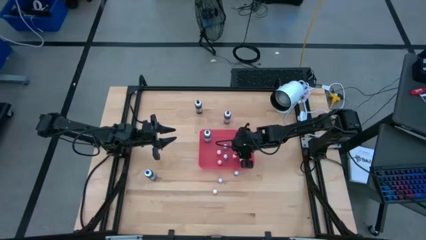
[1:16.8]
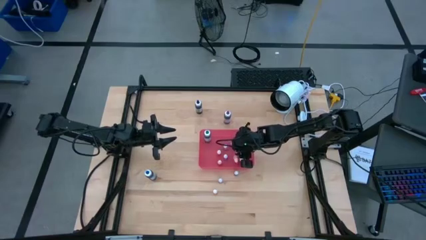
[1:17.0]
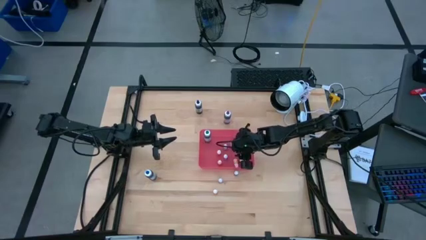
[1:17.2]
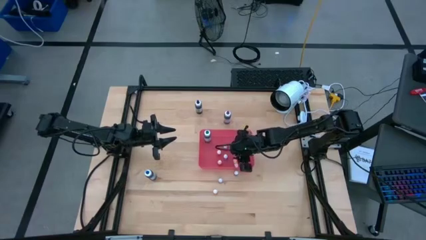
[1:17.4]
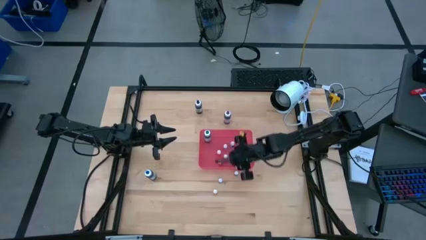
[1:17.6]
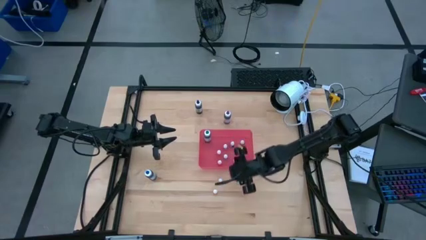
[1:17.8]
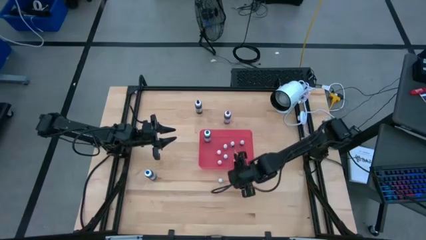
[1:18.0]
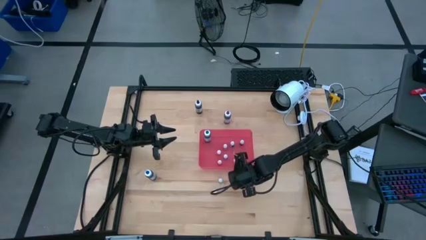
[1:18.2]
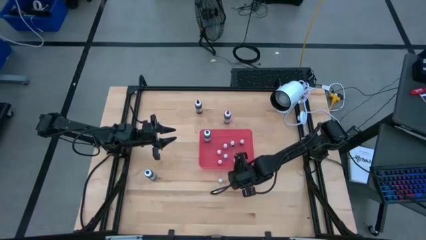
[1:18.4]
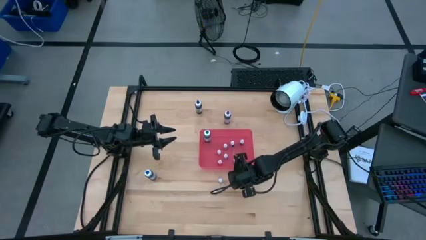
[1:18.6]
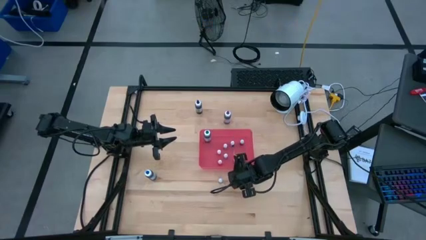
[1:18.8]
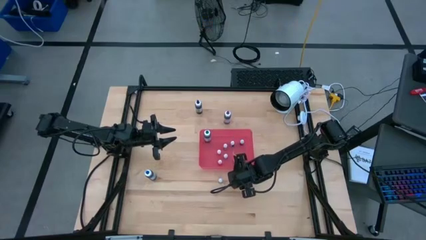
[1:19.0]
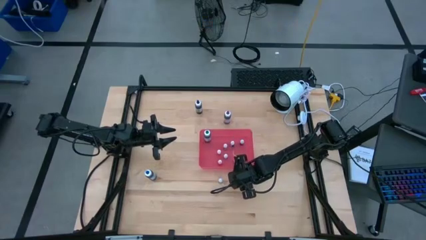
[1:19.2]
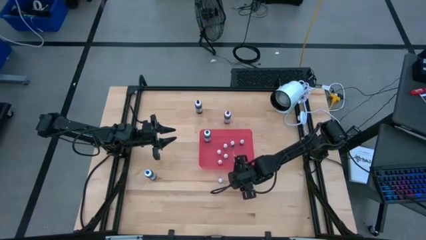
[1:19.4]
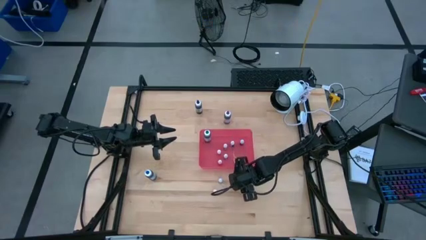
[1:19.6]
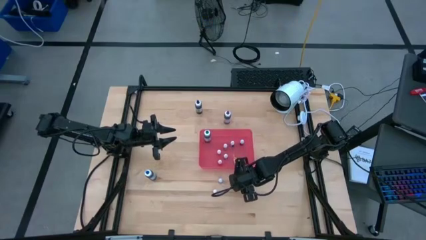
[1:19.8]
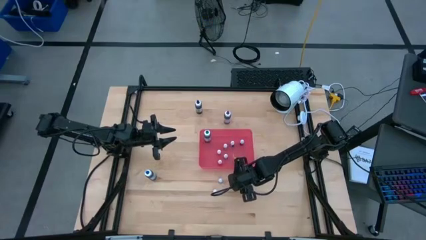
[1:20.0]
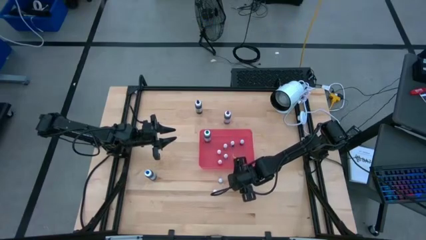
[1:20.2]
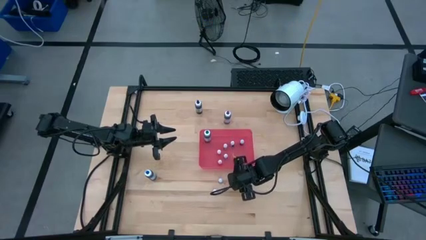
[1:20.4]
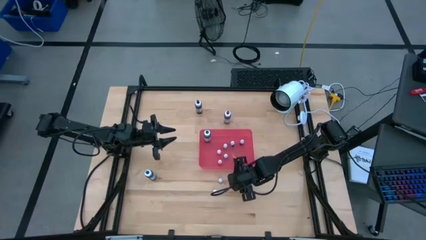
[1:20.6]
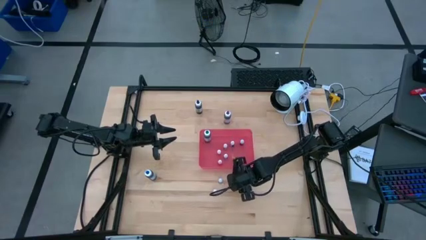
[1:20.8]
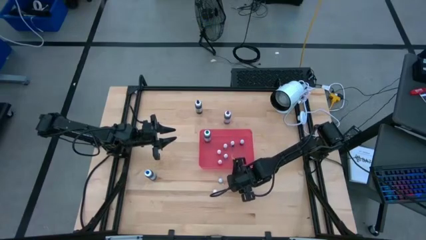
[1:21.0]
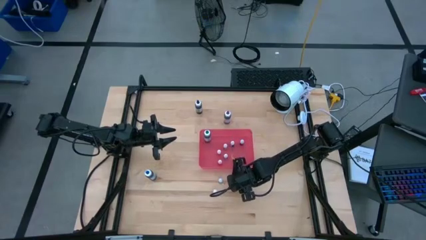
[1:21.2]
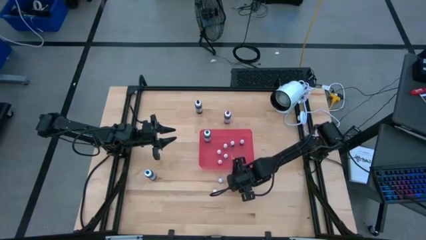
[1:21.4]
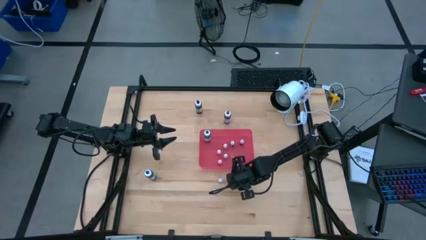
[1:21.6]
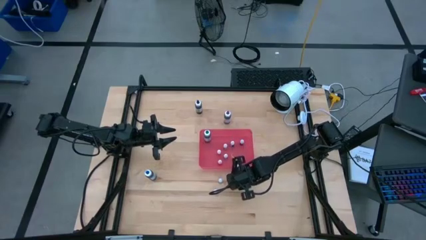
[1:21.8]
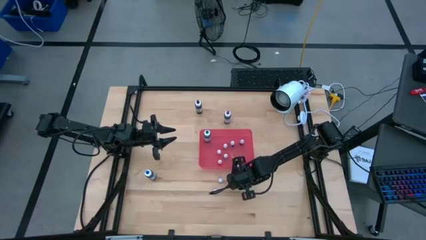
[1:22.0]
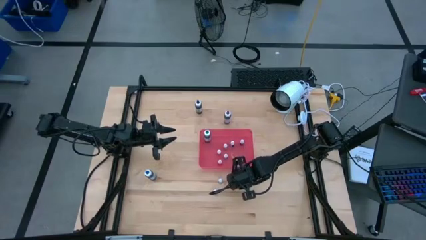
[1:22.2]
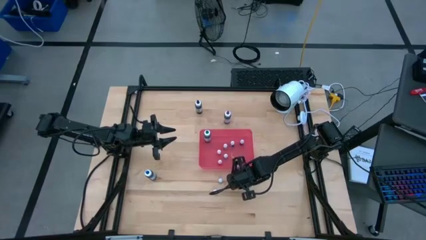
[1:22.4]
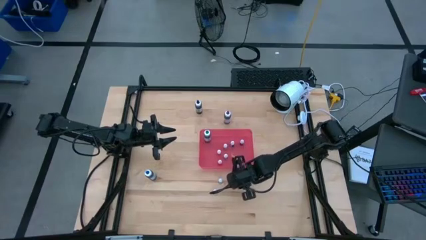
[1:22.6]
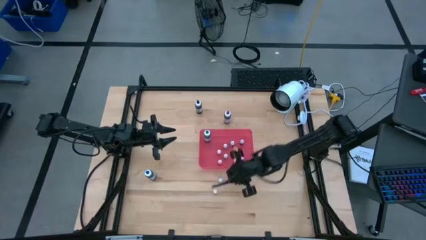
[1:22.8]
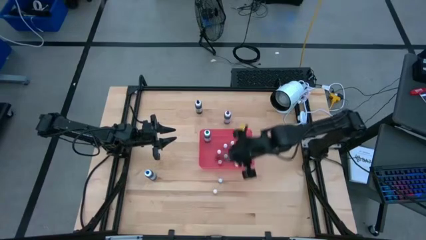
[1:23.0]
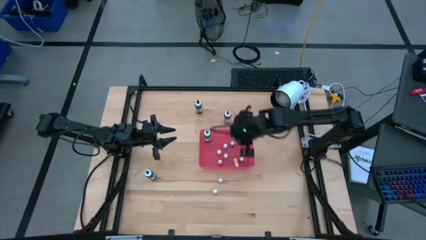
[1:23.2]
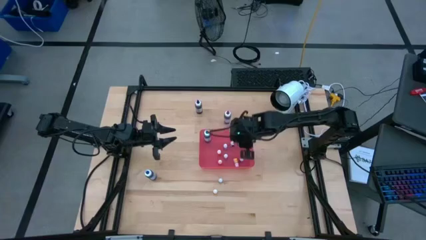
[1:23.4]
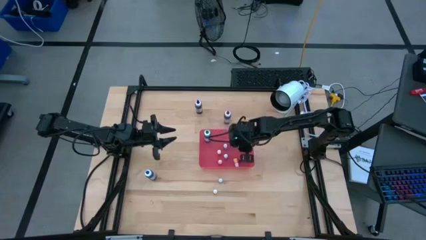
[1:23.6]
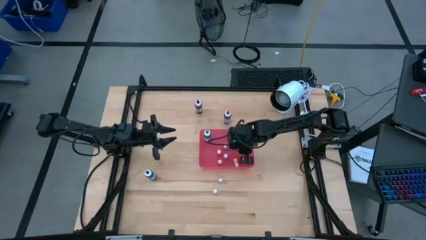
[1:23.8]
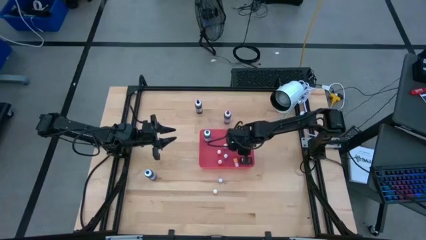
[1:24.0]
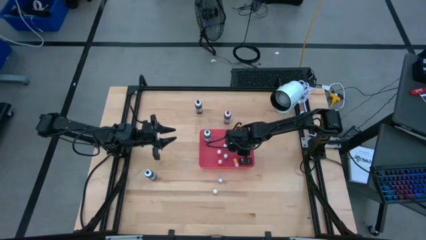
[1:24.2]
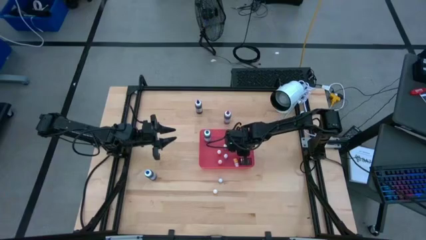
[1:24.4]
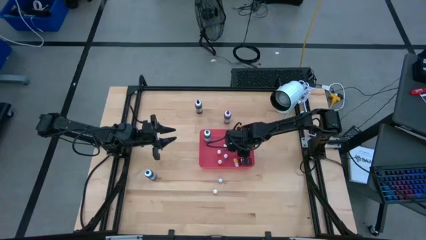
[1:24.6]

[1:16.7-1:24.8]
Task: Pick & Place food coloring
Put the small purple food coloring bottle into the red bin

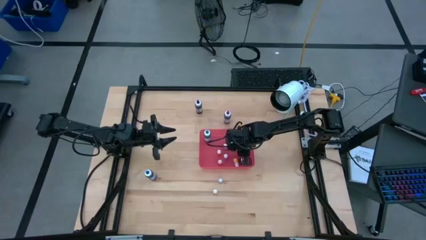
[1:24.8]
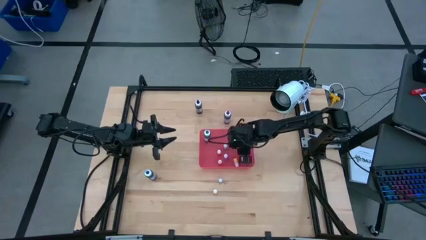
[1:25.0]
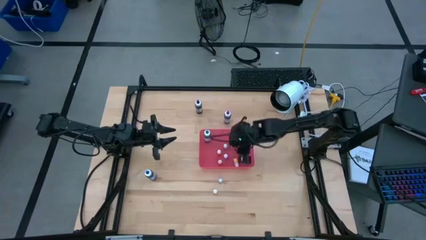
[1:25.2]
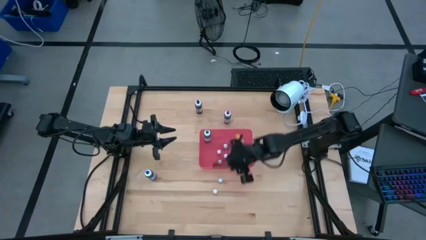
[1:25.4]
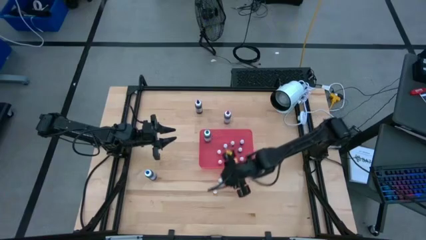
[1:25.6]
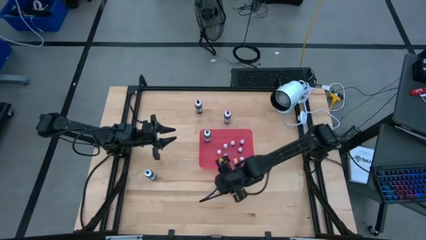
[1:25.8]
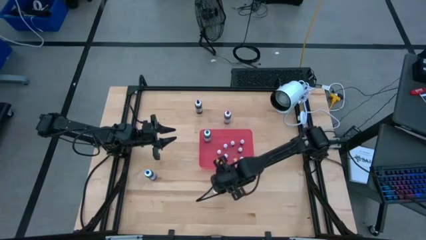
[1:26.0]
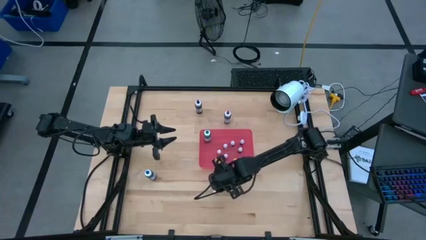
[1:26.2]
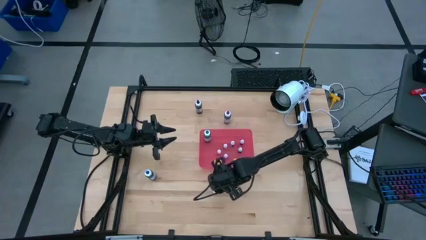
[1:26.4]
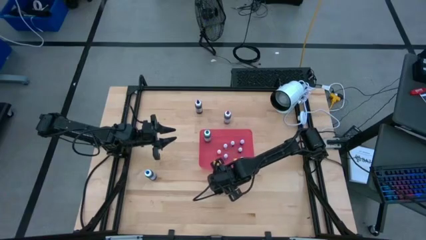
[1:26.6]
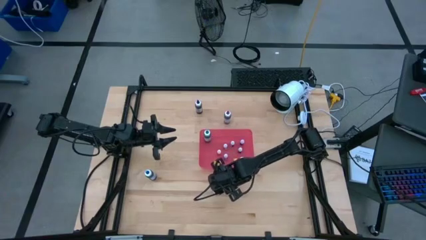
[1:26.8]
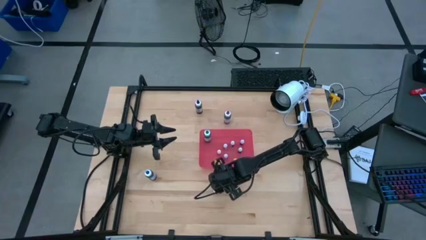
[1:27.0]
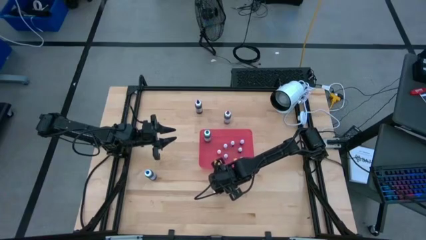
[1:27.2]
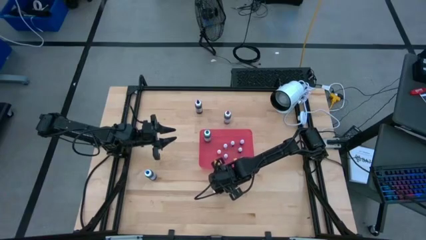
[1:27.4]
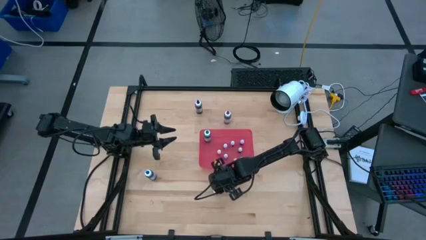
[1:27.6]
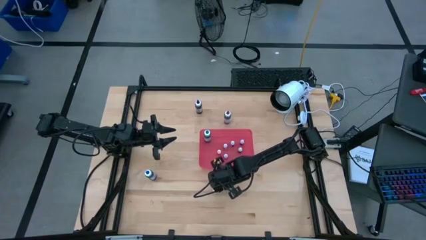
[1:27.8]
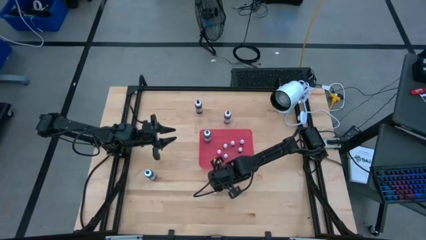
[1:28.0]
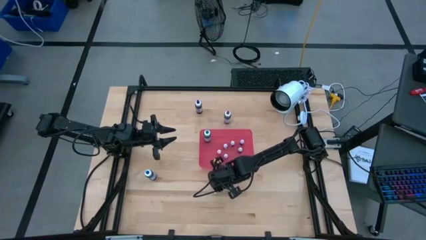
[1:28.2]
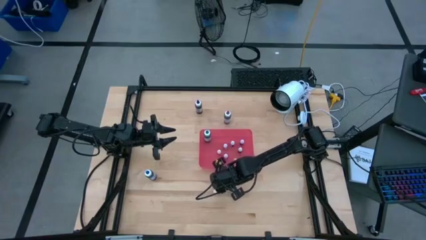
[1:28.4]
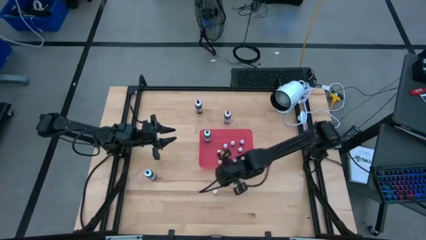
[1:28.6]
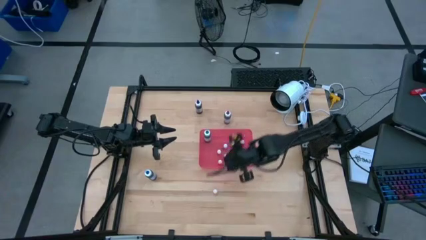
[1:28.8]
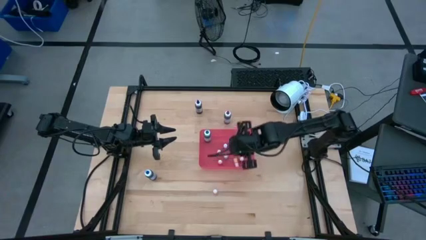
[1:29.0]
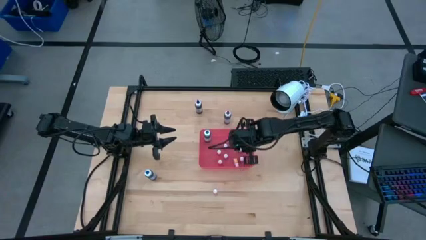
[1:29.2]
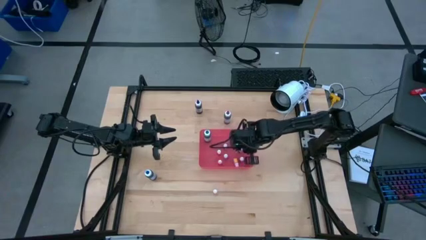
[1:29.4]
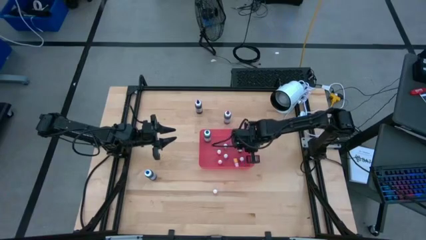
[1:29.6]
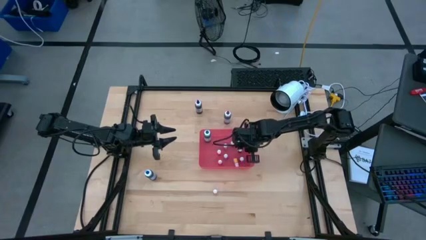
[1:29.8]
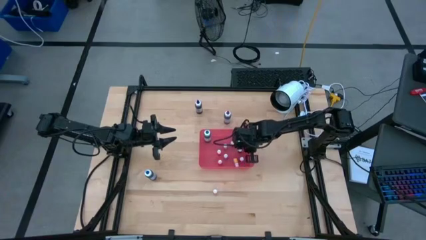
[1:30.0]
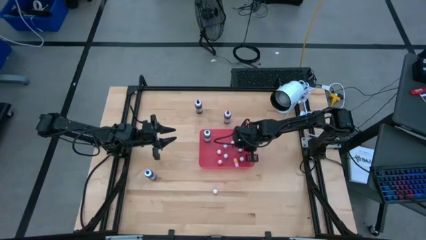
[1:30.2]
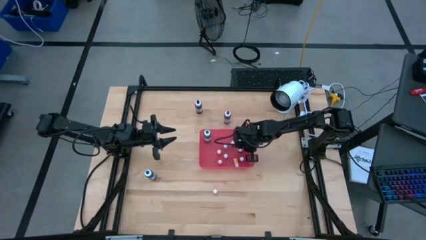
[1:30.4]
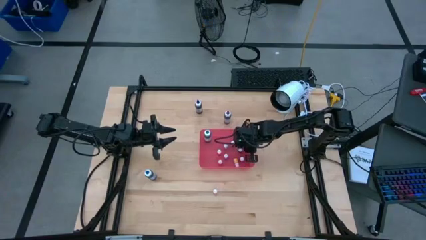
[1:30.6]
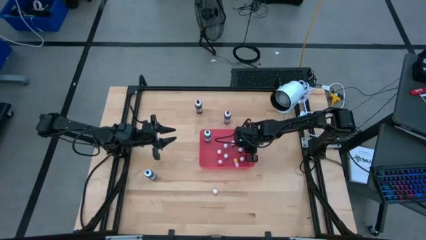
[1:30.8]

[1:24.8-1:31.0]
Put the small green food coloring bottle into the red bin

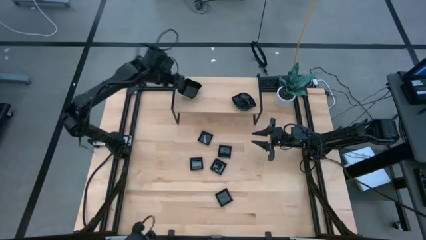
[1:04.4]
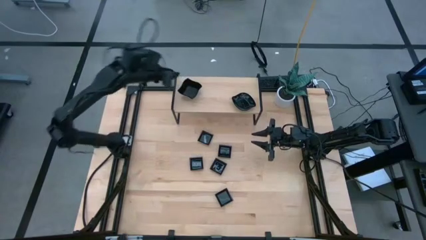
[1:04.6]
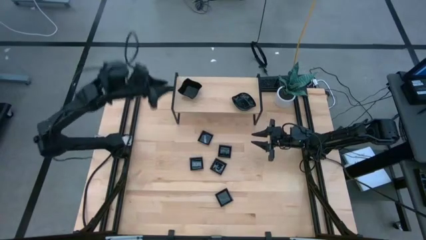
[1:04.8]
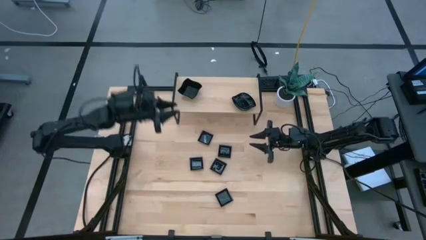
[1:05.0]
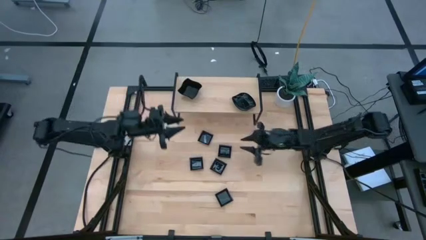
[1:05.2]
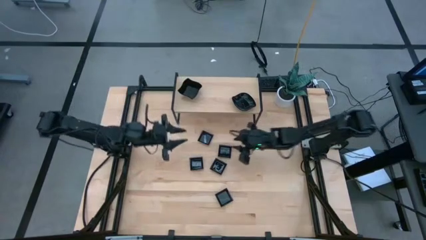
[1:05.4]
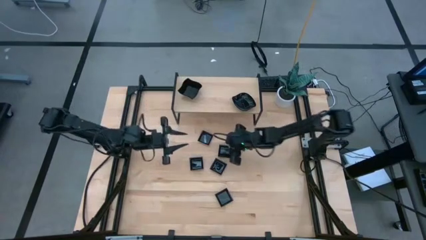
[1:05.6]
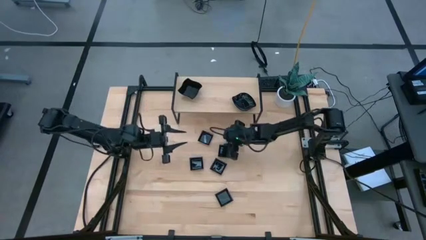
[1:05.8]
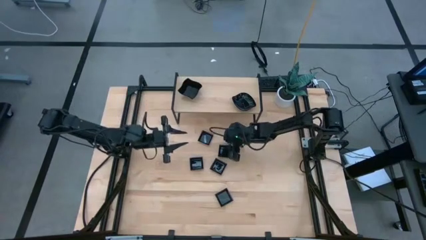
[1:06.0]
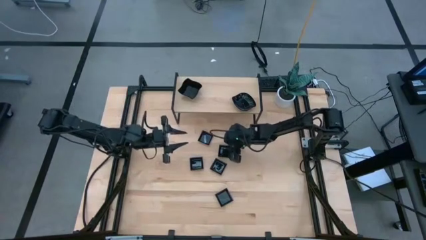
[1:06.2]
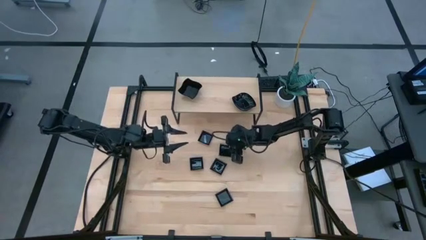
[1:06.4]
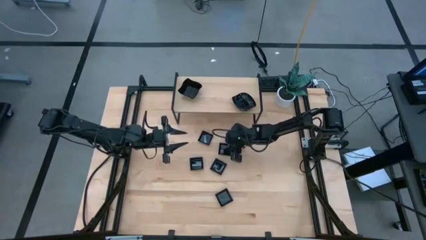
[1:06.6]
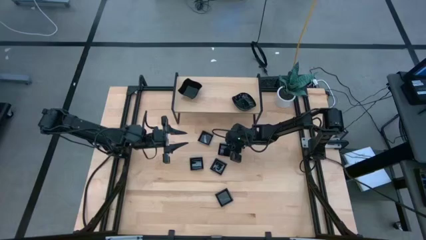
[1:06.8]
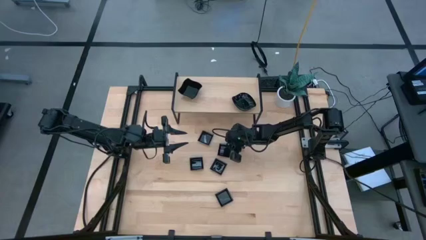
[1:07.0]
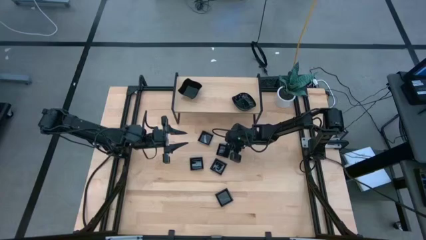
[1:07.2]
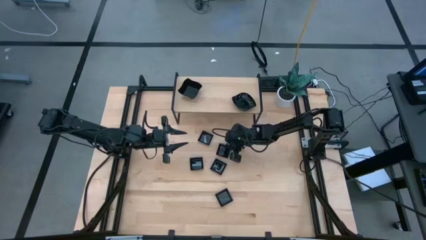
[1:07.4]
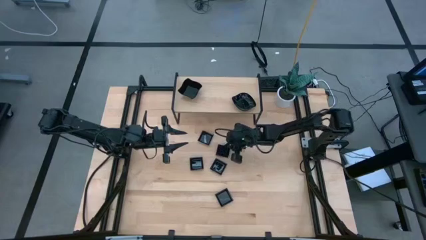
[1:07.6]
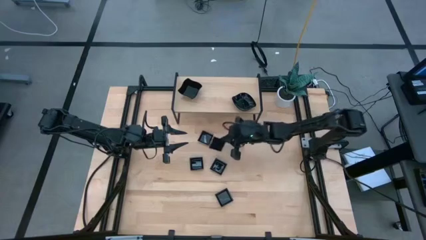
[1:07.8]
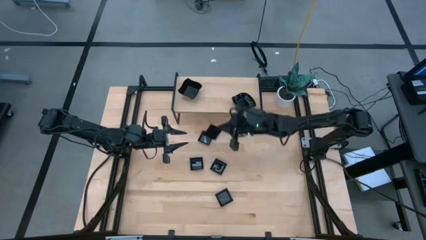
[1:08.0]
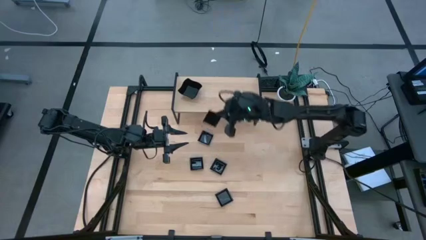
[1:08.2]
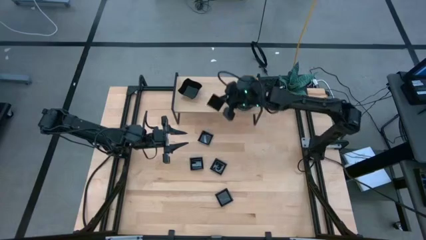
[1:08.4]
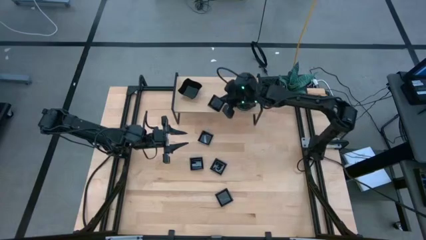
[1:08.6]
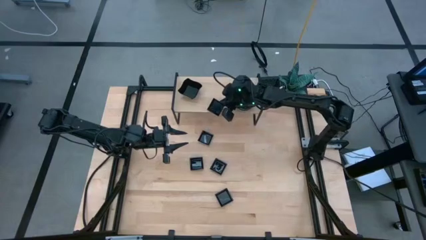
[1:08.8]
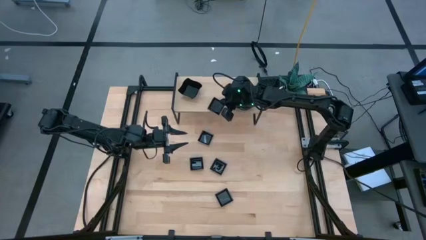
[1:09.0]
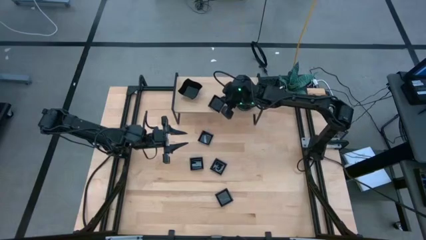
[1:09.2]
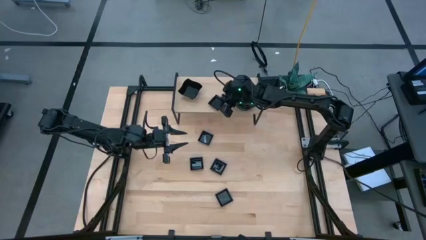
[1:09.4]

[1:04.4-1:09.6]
Task: Pick & Place Mini shaped plates
Put the square plate on the shelf
